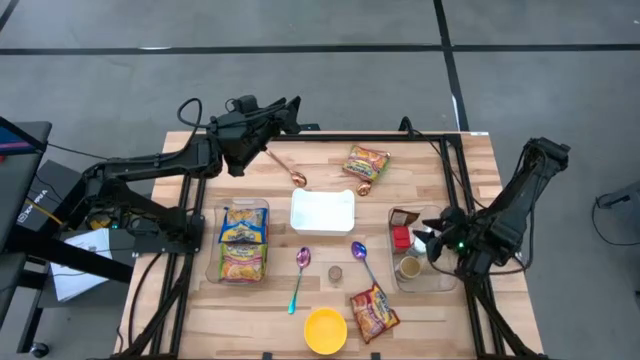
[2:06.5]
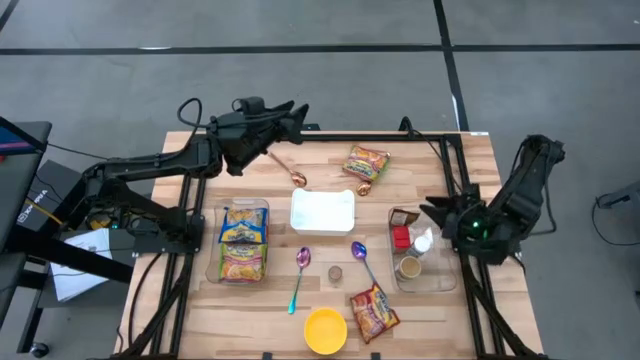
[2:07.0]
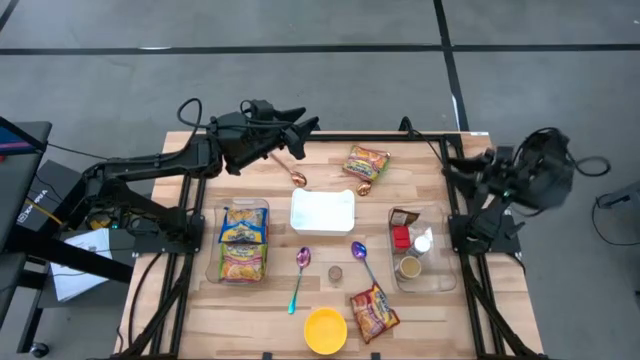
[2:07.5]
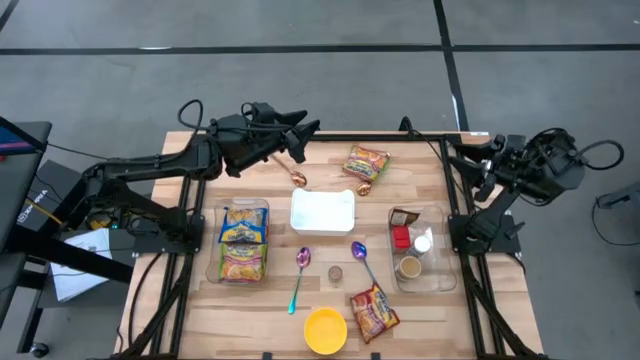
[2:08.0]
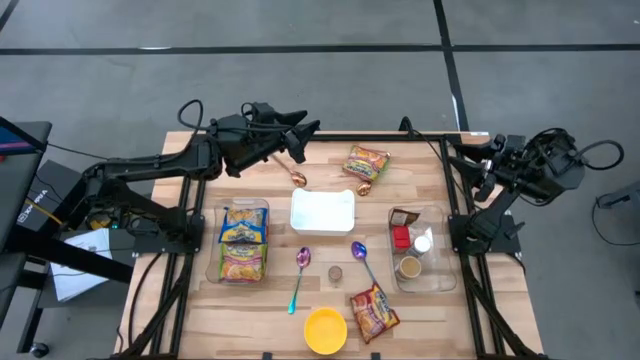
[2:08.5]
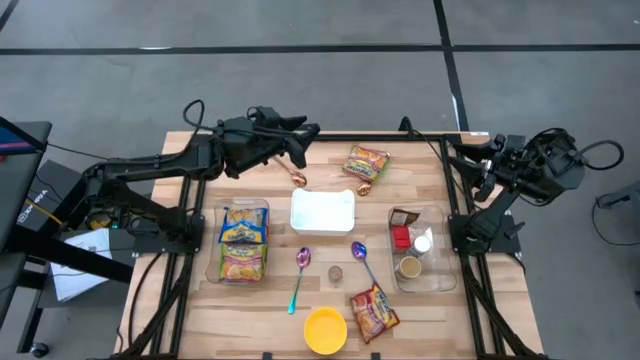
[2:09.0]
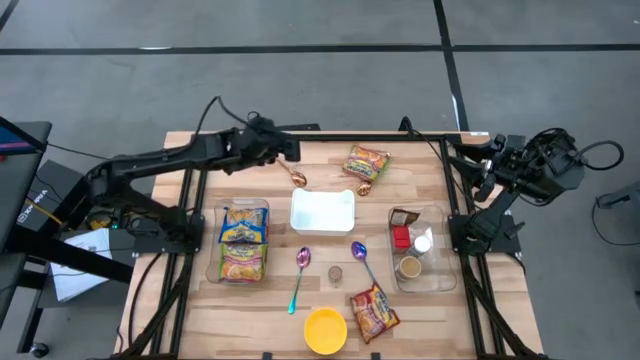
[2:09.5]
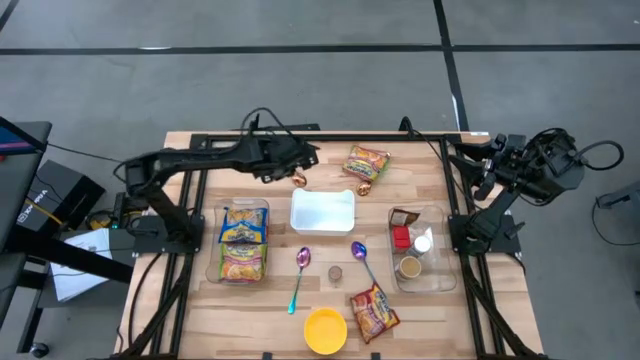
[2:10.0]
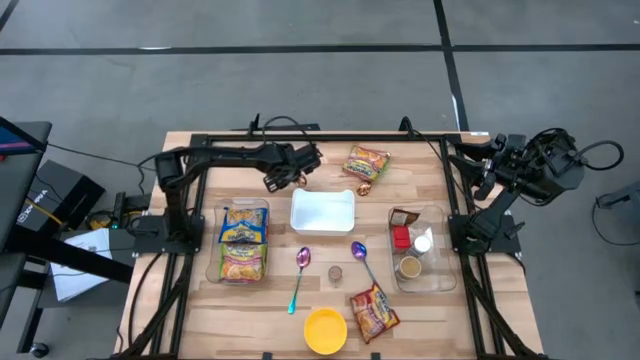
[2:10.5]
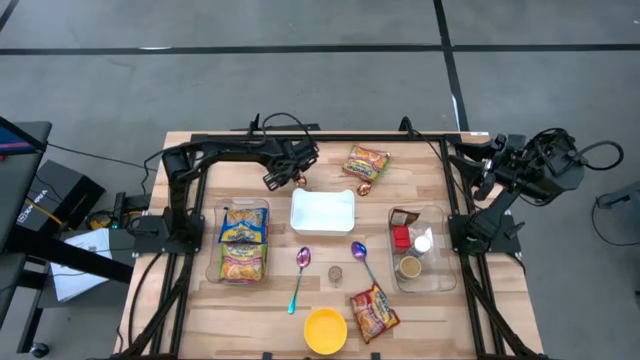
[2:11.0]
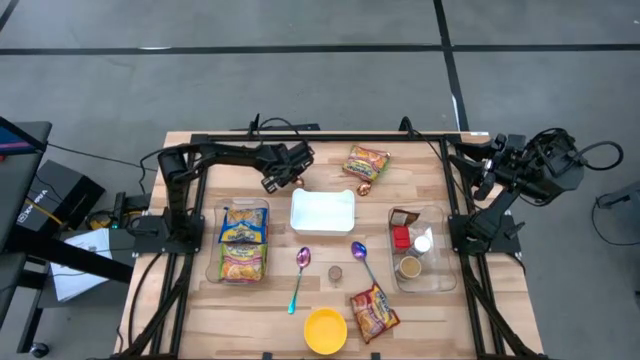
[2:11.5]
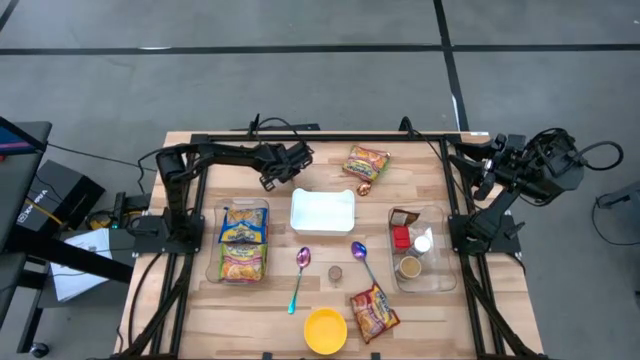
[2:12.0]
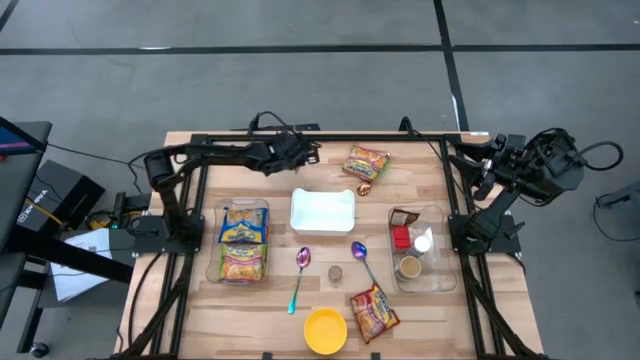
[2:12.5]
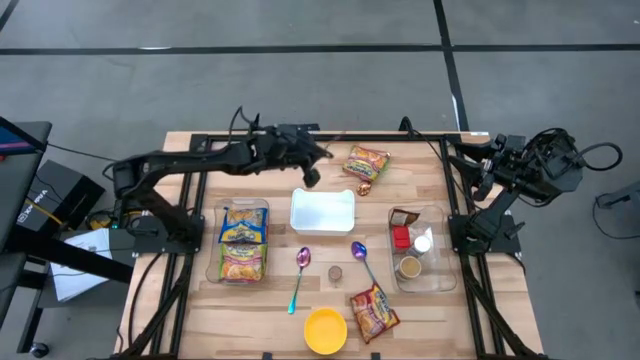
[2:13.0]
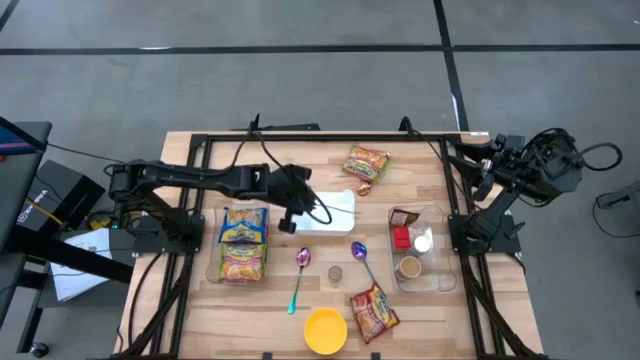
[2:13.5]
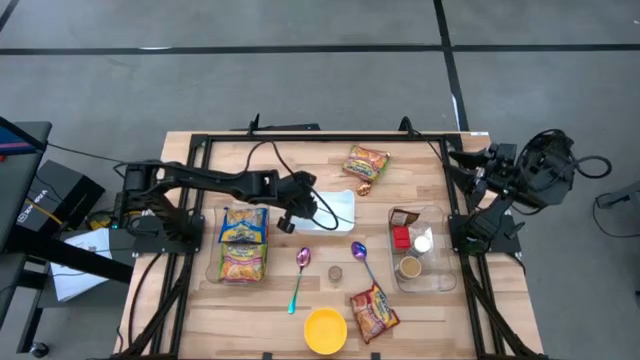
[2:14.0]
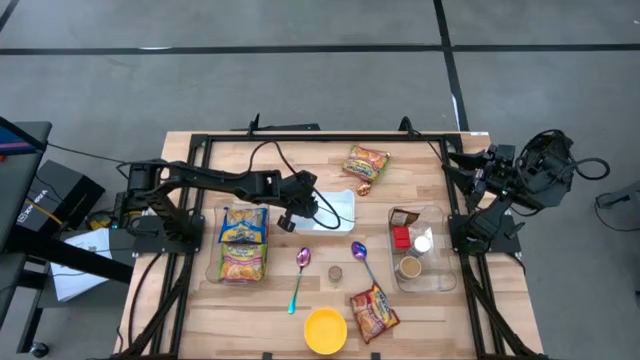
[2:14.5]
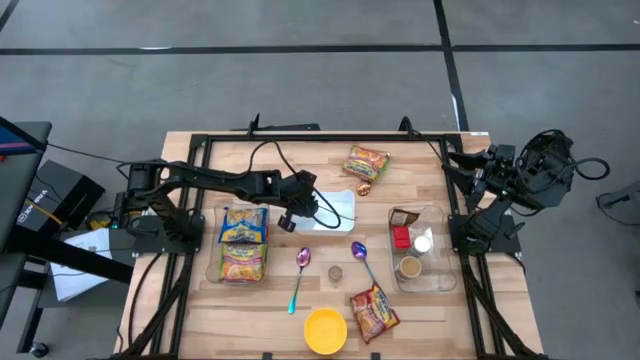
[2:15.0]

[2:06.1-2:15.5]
Task: Pick & Place Food Item
Put the left gold spoon into the white bin

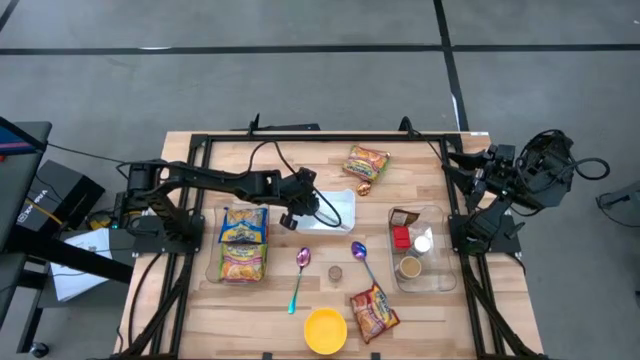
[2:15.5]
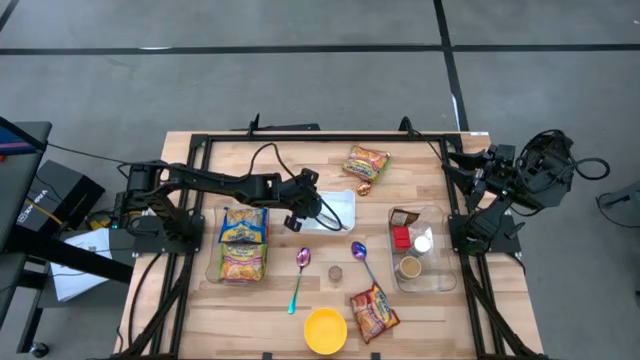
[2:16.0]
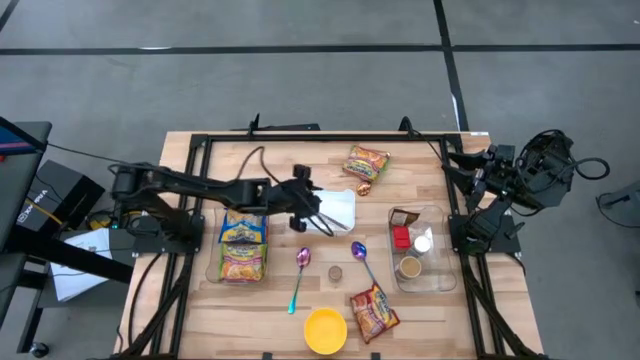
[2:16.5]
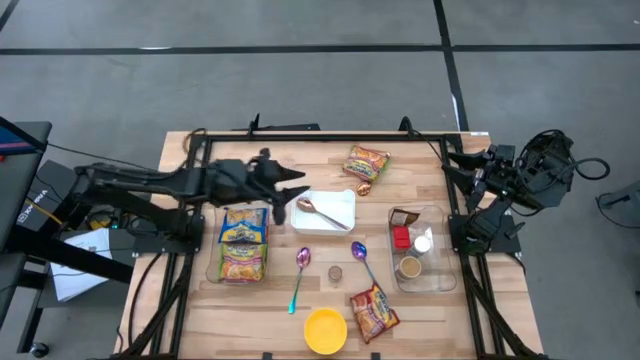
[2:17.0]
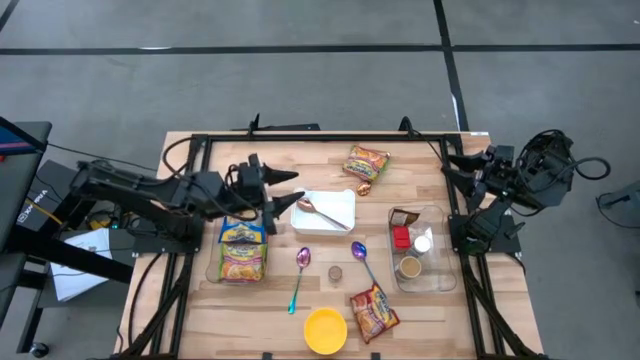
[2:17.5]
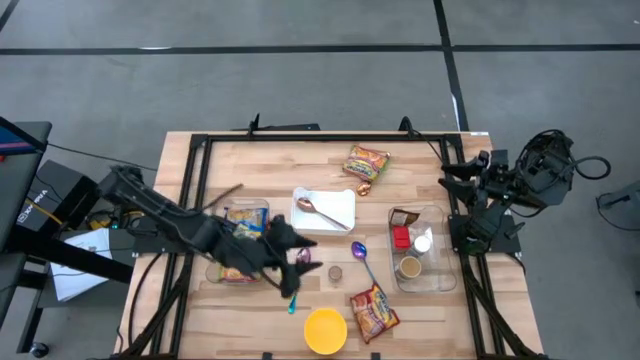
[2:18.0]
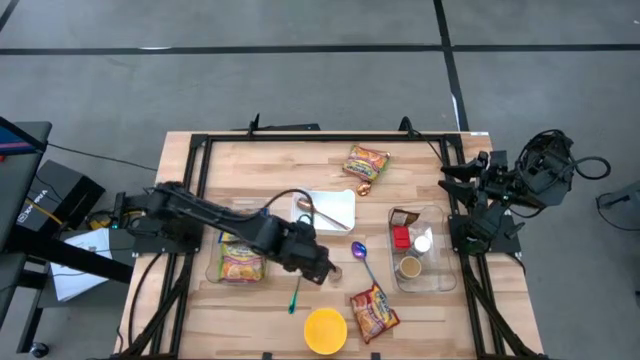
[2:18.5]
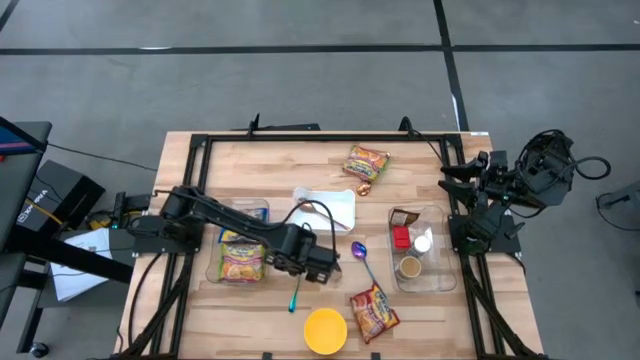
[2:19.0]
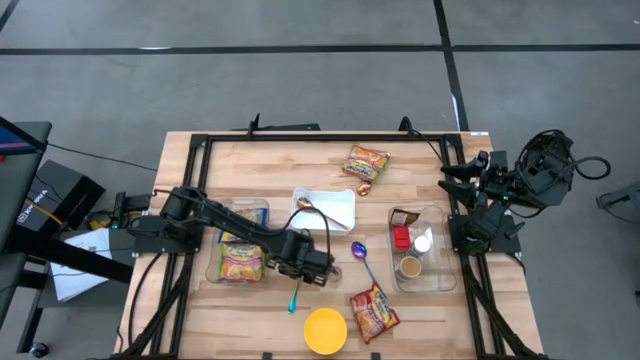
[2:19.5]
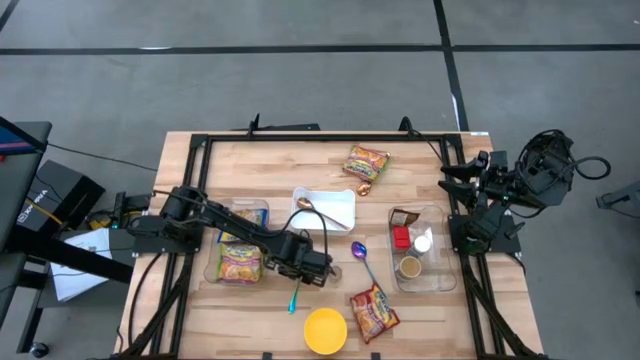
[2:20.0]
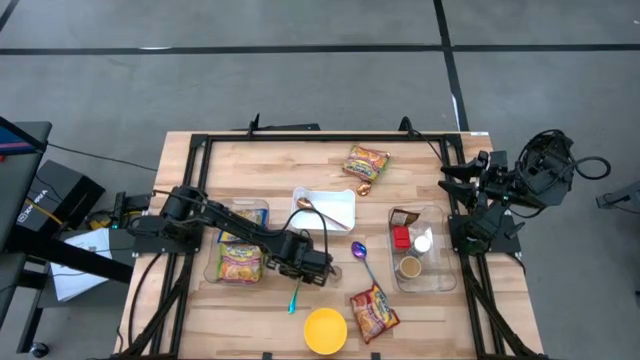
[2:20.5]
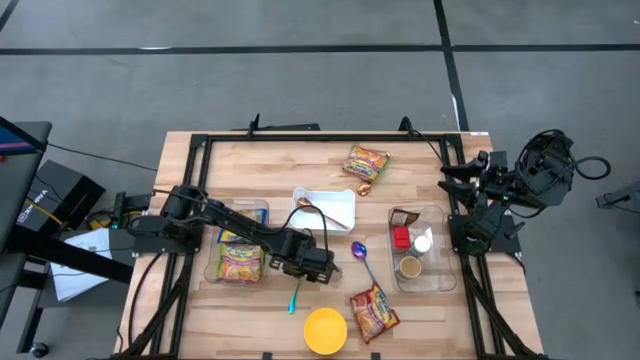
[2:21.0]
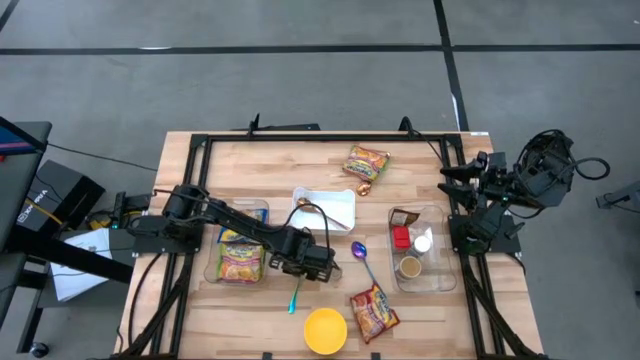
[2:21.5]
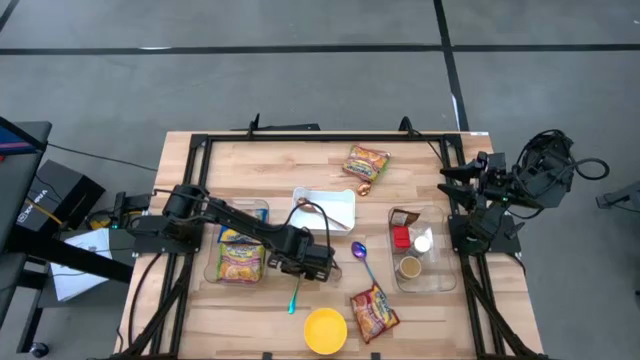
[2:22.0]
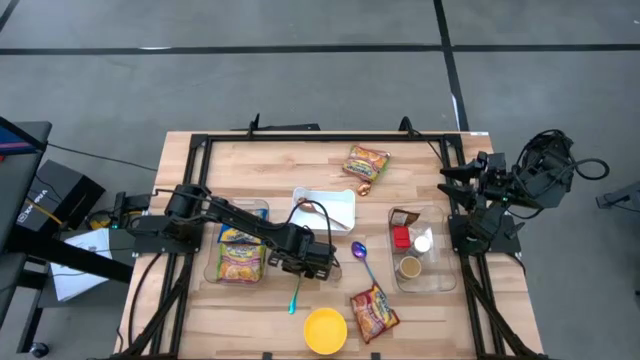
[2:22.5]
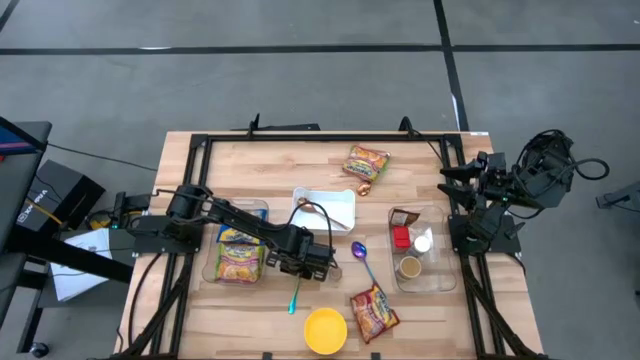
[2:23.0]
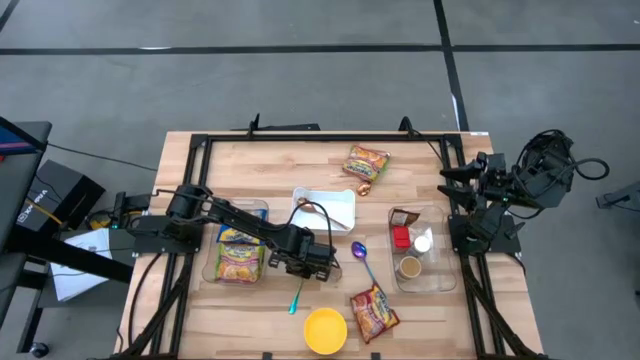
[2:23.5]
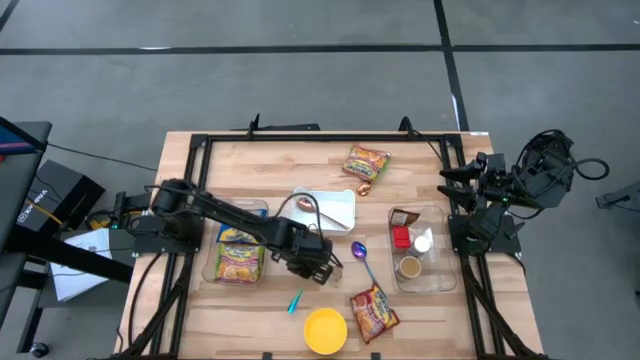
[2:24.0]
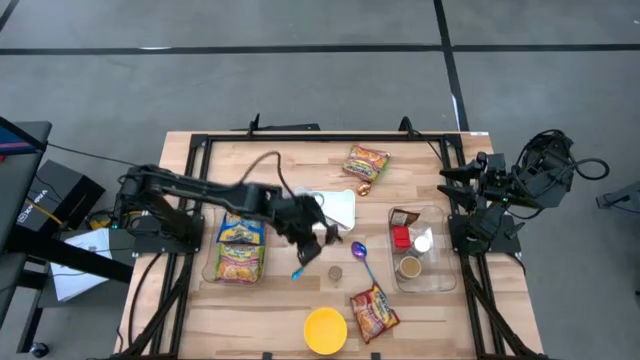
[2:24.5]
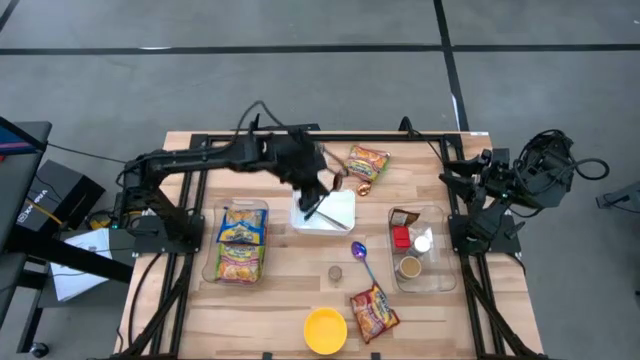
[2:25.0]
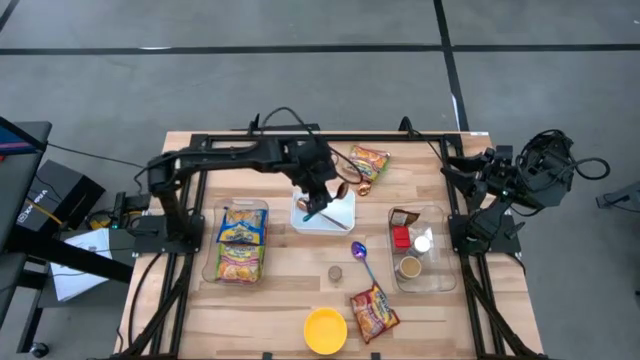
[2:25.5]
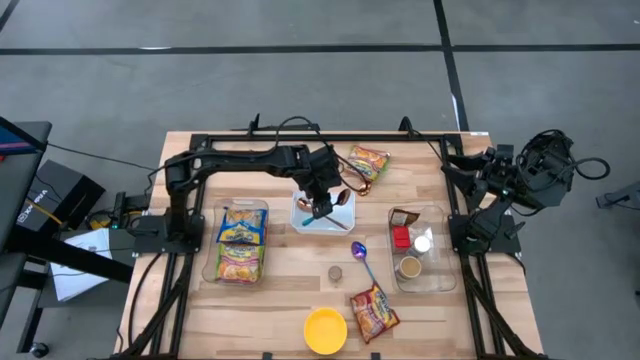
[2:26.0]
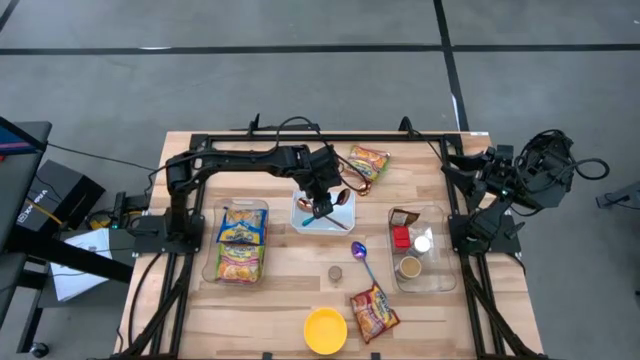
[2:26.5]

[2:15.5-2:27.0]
Put the left violet spoon into the white bin

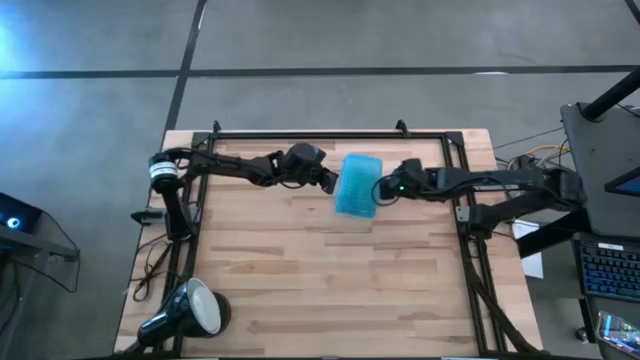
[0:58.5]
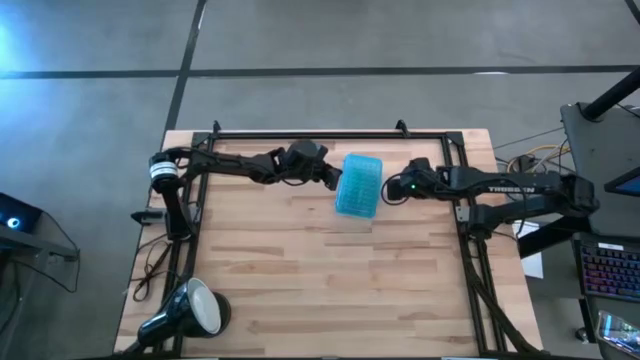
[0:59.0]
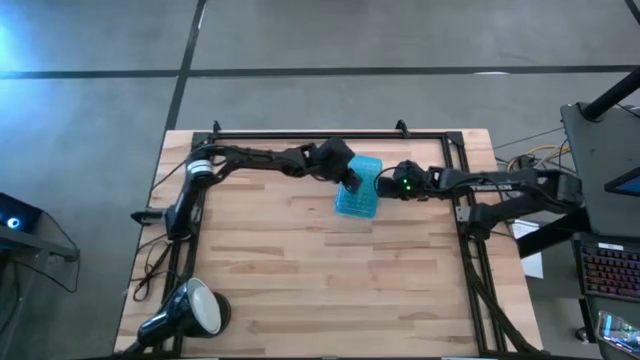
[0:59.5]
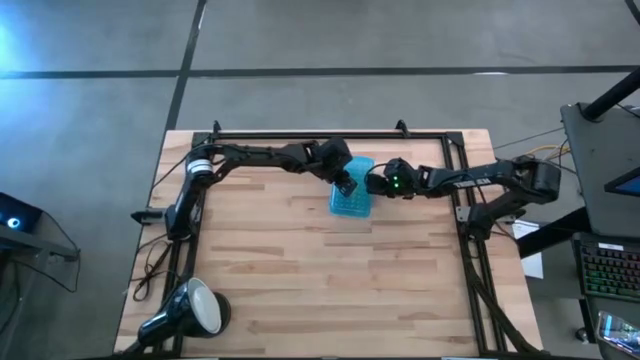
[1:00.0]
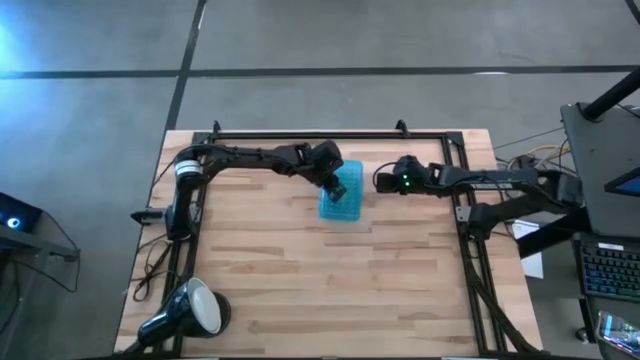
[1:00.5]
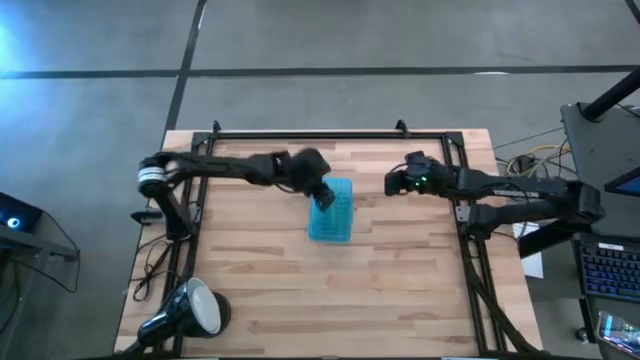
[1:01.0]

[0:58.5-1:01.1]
Task: Pick & place school supplies into a supply box
Move the blue supply box to the center of the table
